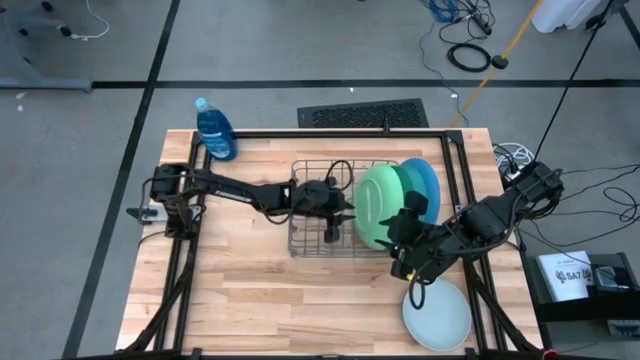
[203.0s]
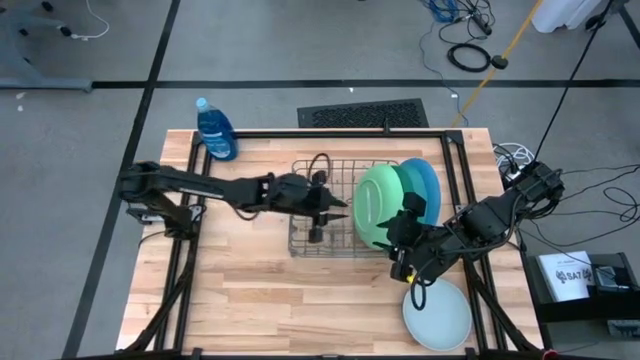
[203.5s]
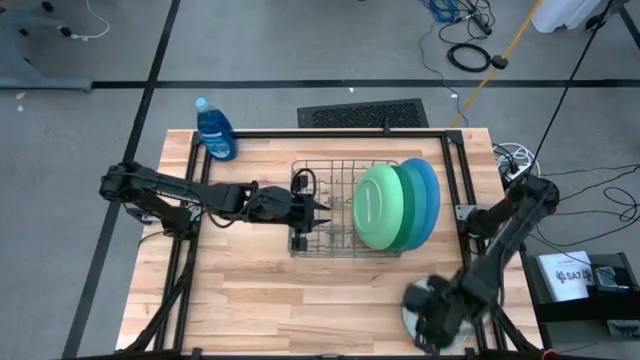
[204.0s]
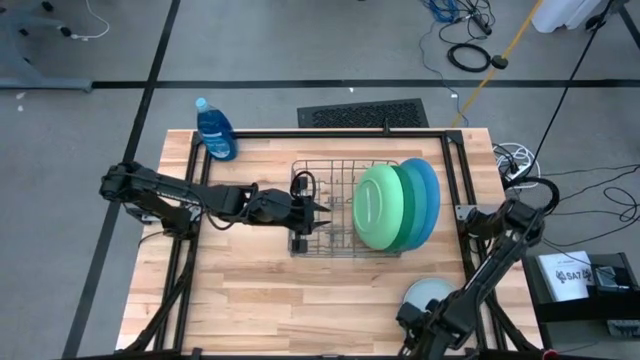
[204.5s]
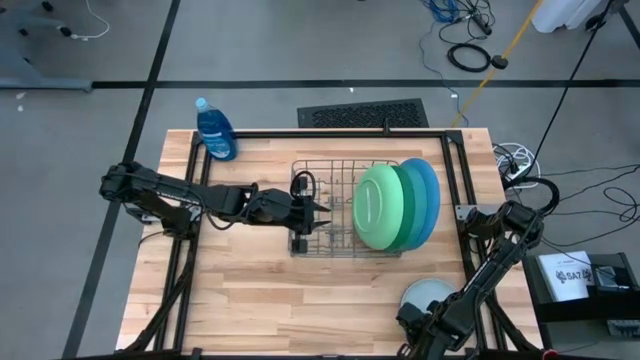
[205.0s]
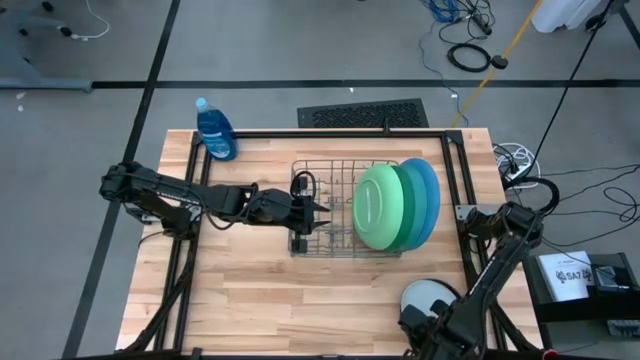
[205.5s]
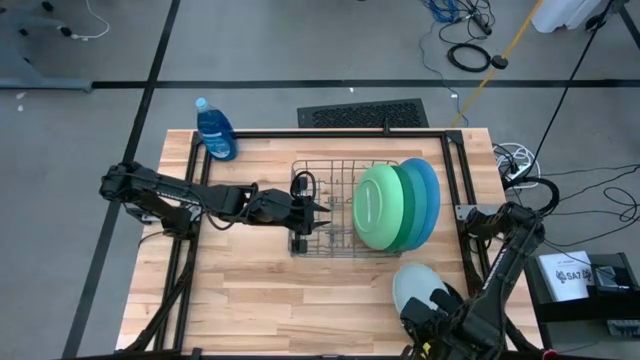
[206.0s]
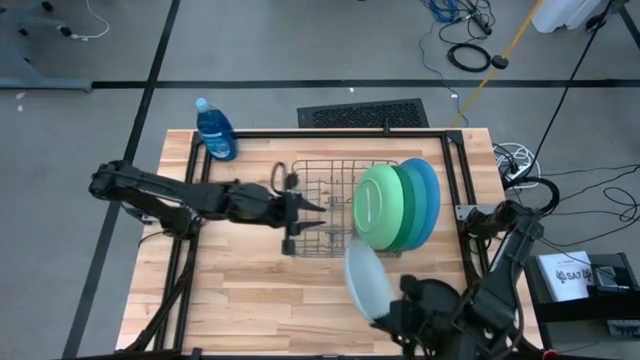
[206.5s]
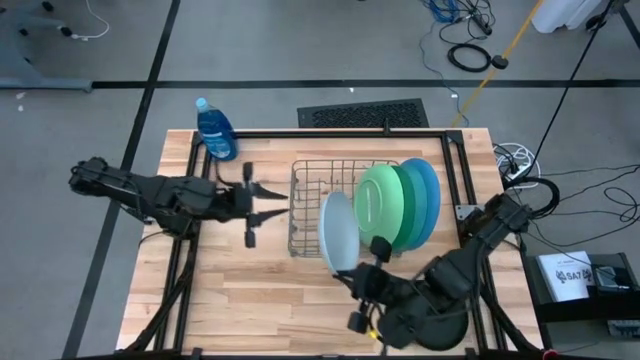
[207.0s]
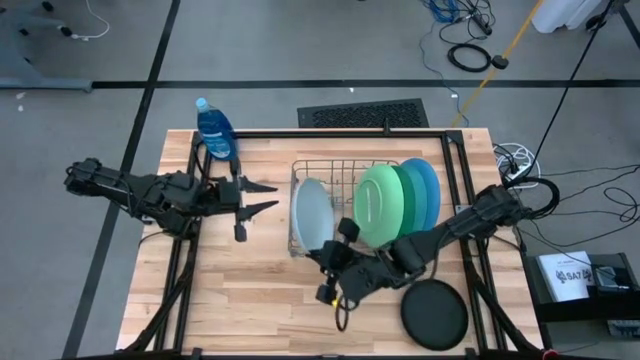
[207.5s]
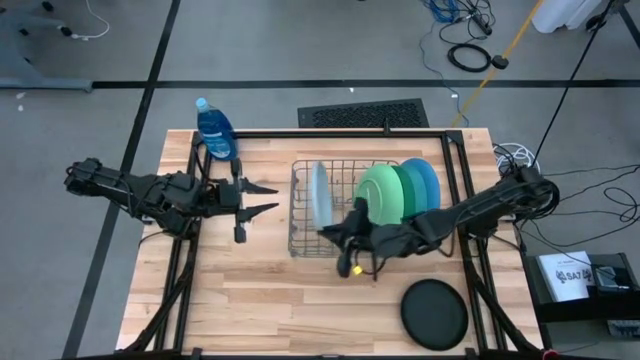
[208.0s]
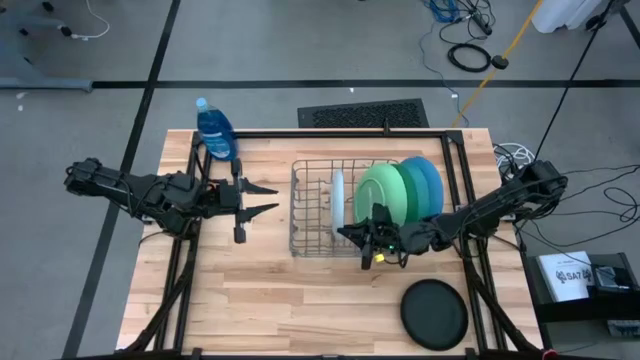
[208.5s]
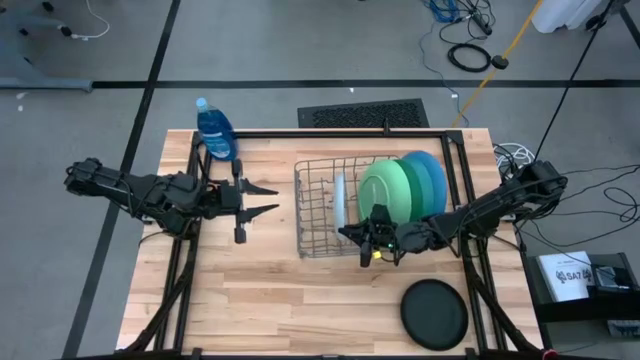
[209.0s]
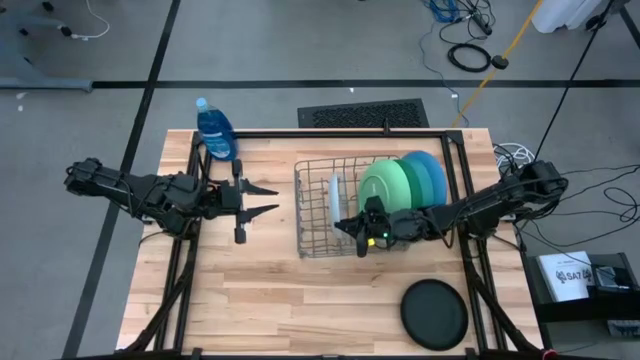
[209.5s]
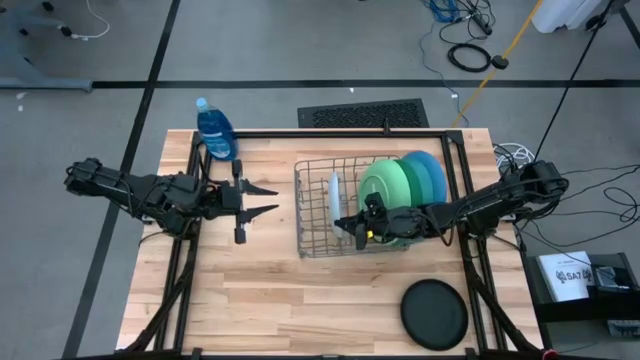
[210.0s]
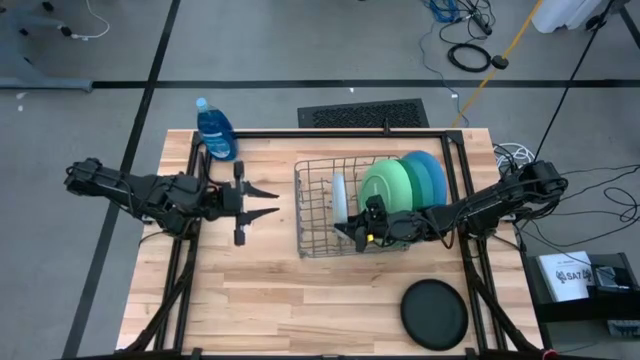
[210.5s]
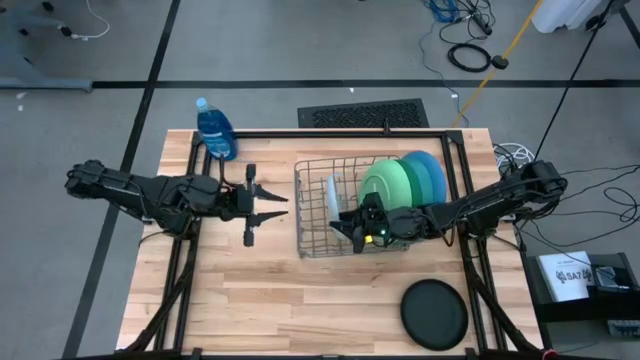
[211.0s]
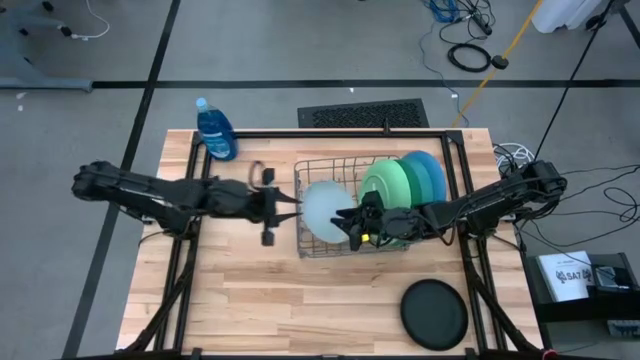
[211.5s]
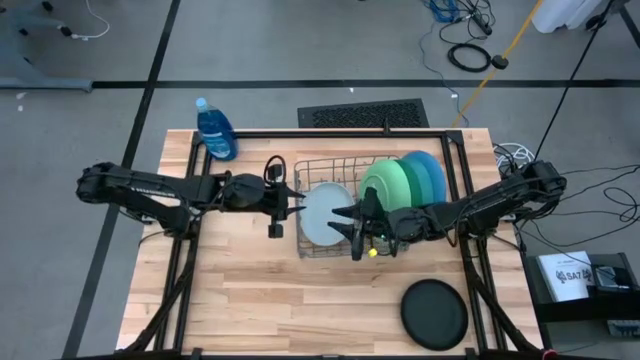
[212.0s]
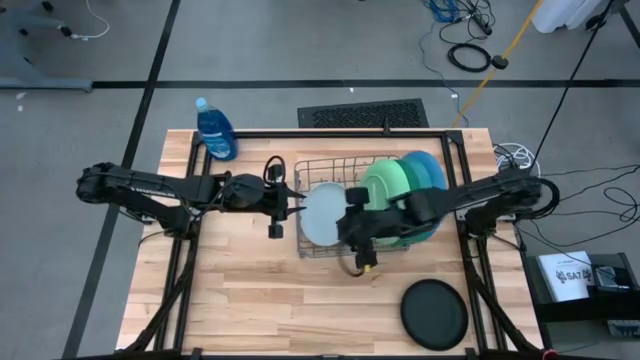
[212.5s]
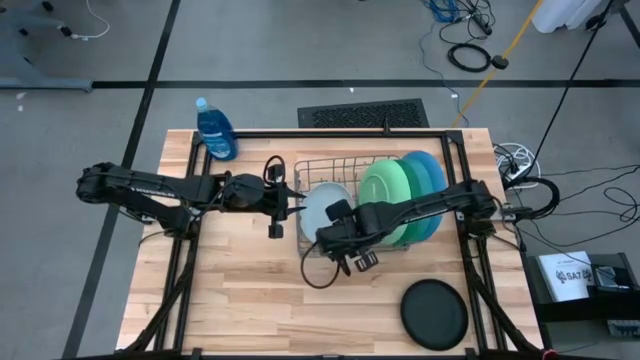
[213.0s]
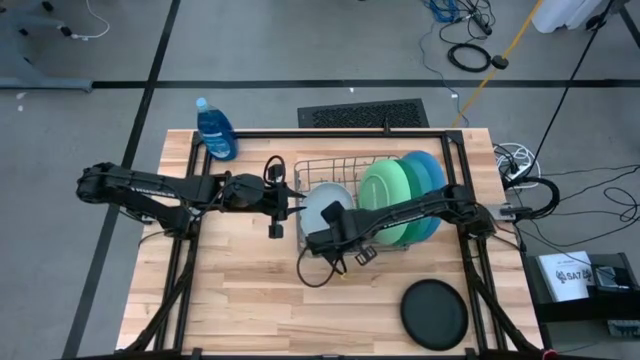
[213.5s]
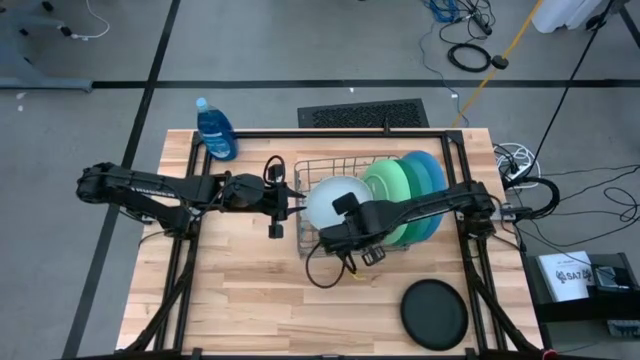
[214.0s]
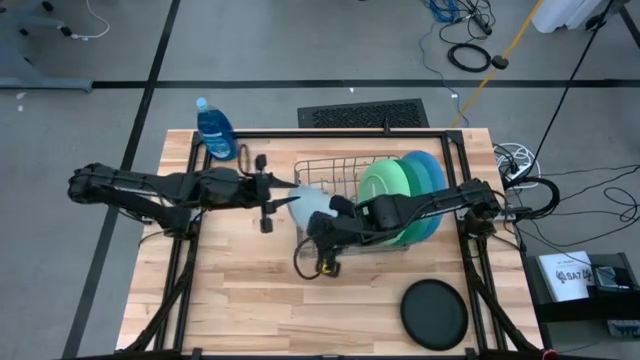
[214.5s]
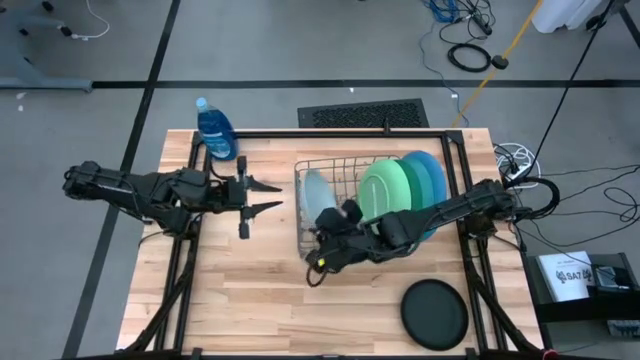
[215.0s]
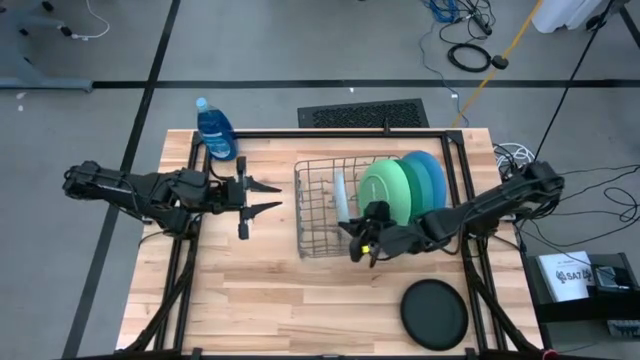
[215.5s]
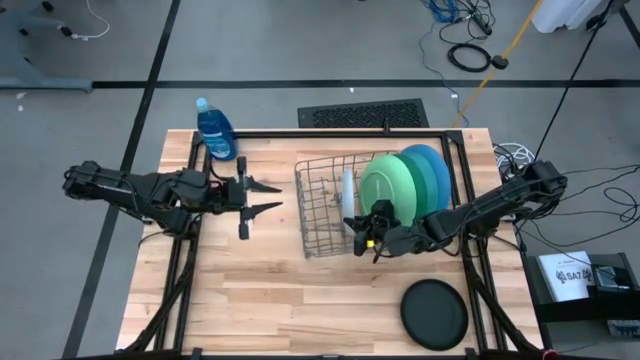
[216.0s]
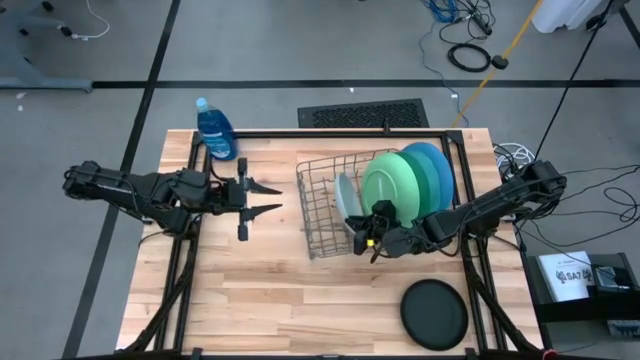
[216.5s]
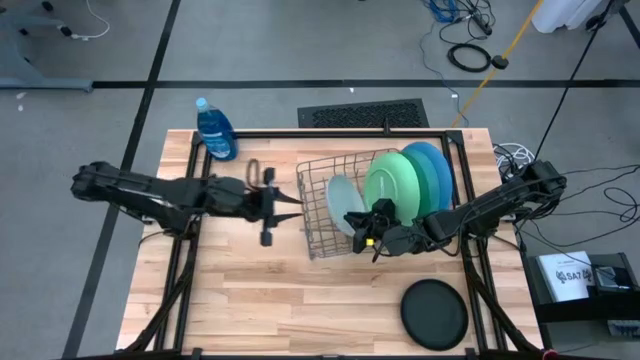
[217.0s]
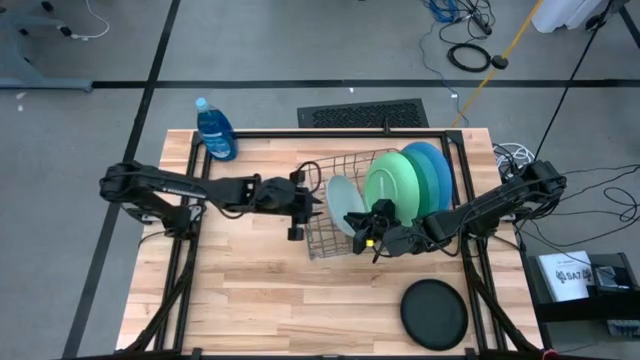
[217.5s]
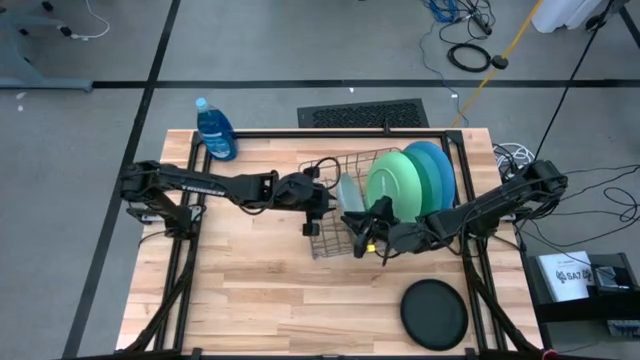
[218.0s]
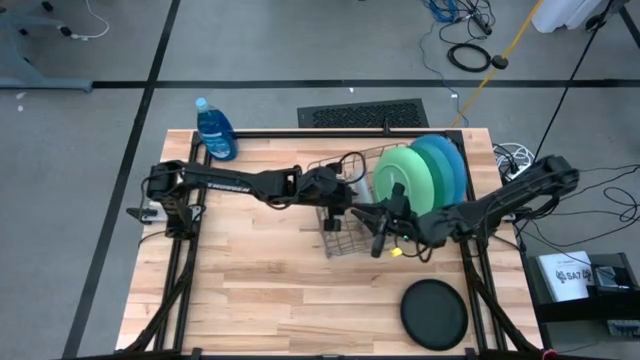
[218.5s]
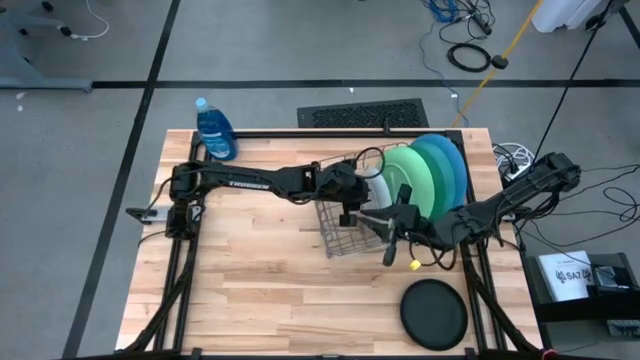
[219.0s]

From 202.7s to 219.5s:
Task: Sort dishes
Put the white plate into the dish rack

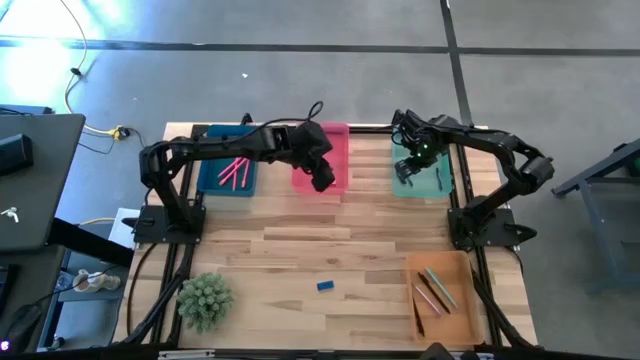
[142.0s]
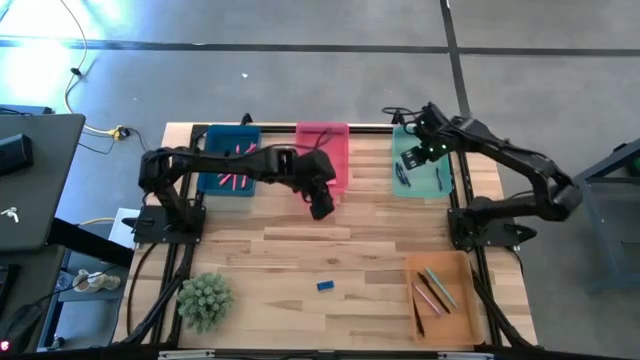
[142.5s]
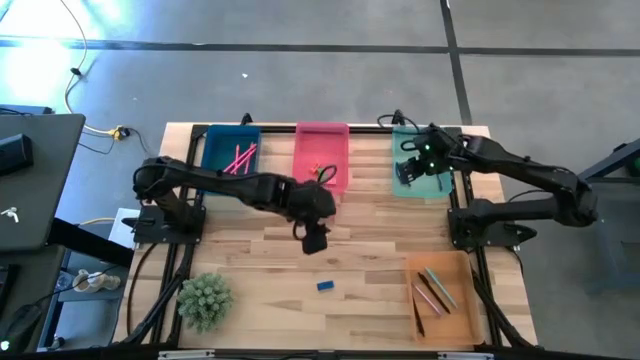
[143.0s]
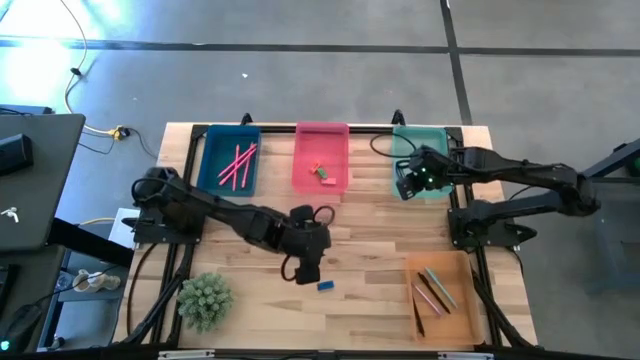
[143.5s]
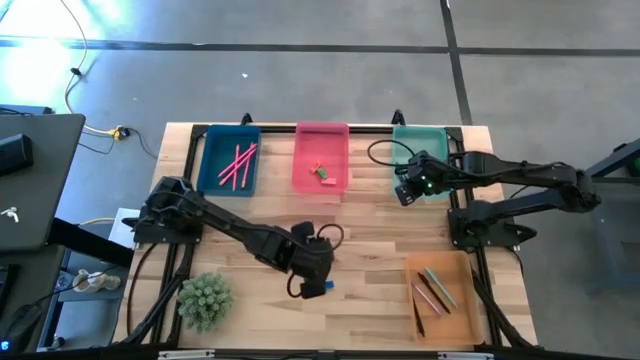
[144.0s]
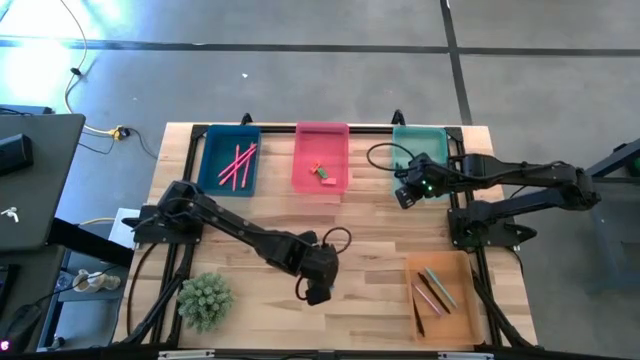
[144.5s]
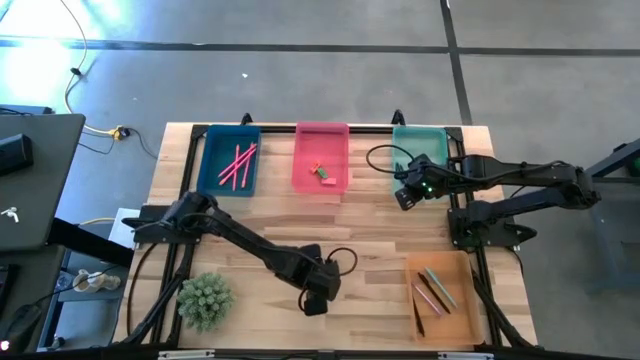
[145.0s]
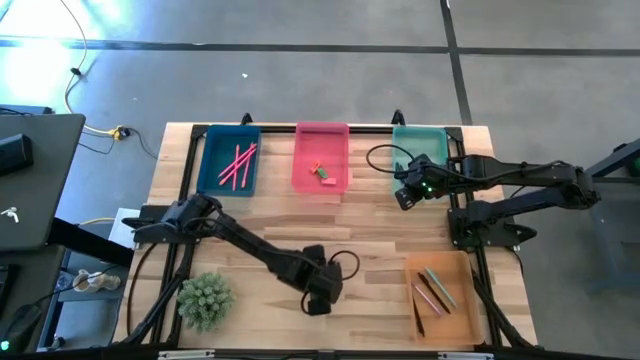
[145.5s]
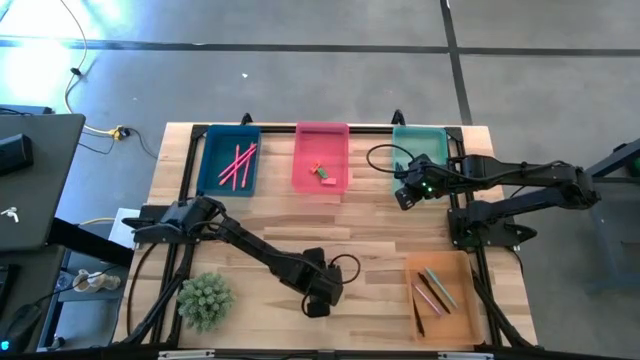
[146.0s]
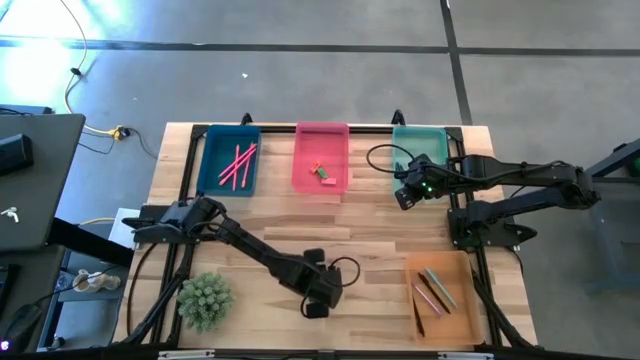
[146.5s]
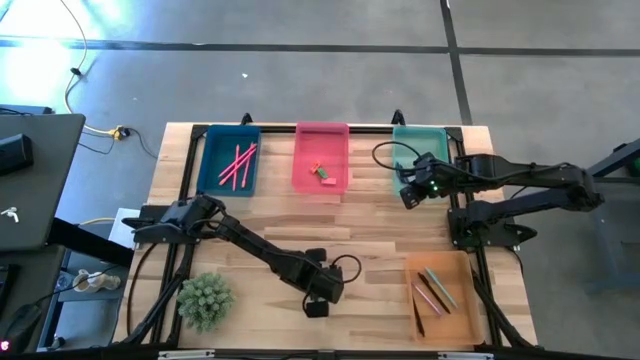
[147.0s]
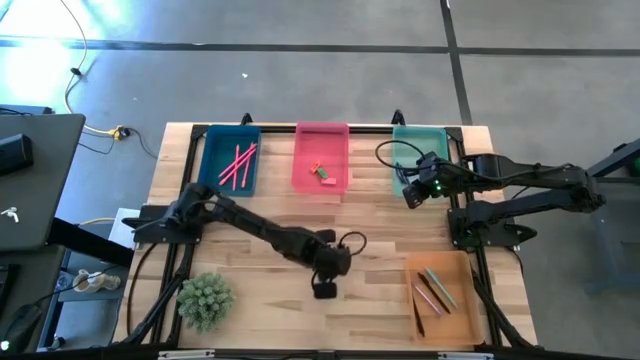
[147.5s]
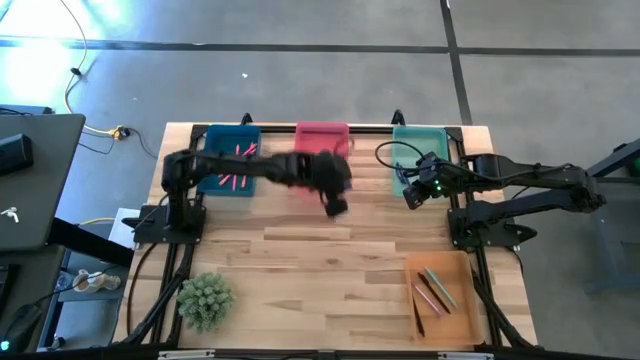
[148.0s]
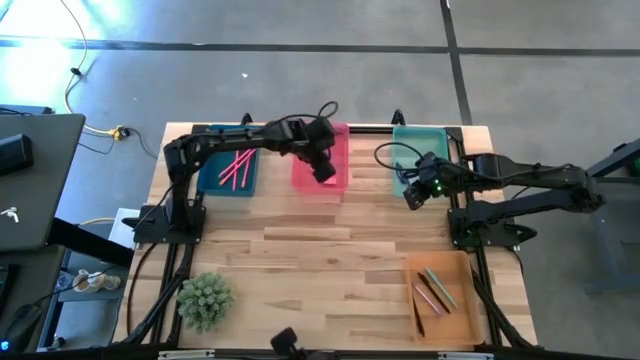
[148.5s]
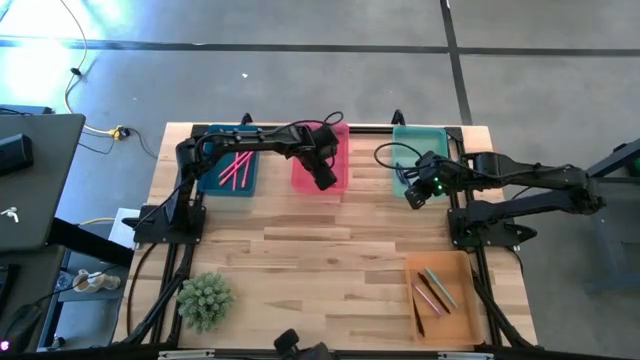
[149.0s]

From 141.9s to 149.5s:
Task: Sort crayons/erasers/pens/pencils in bins
Put the blue eraser into the pink bin
